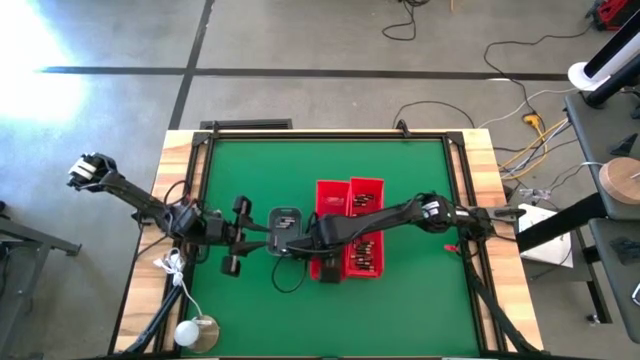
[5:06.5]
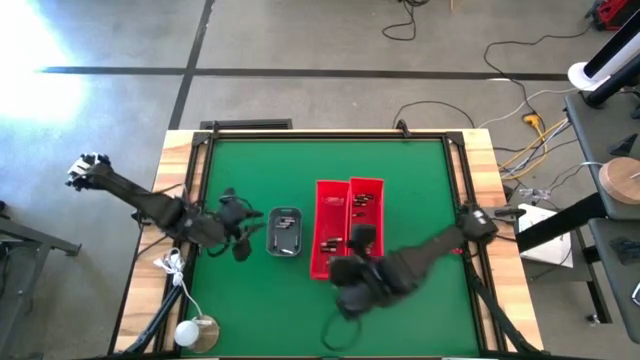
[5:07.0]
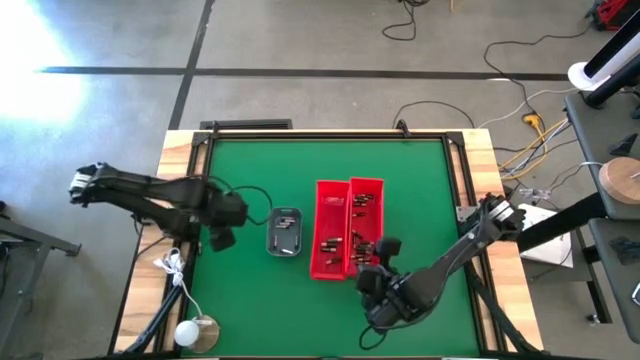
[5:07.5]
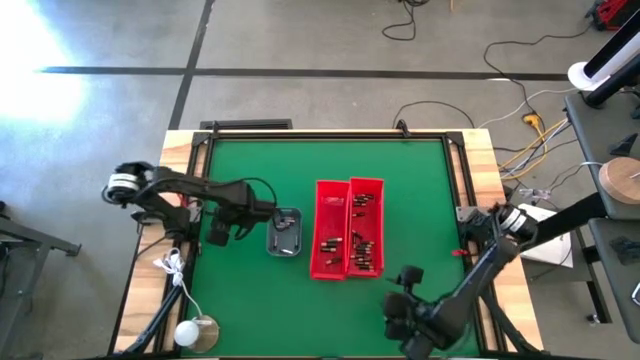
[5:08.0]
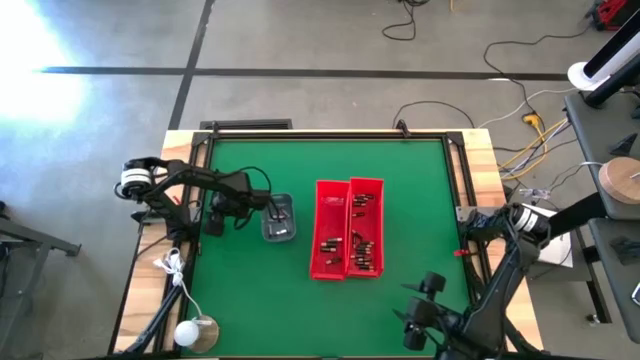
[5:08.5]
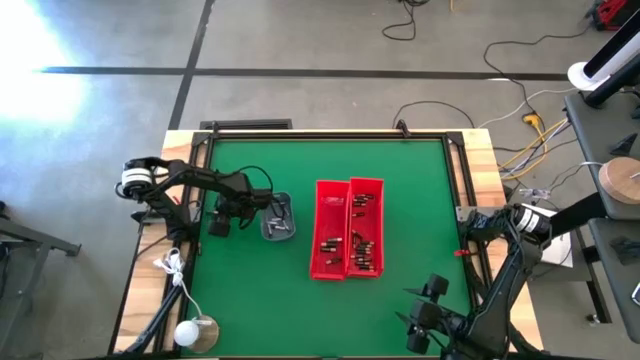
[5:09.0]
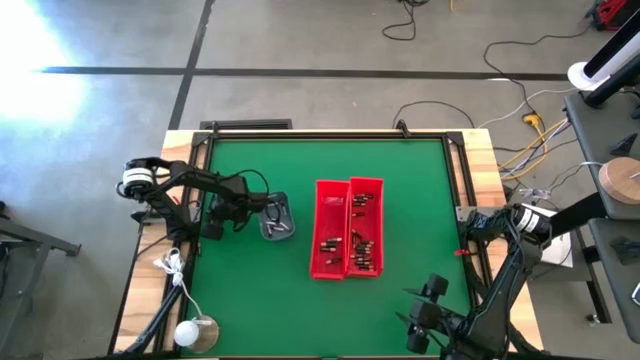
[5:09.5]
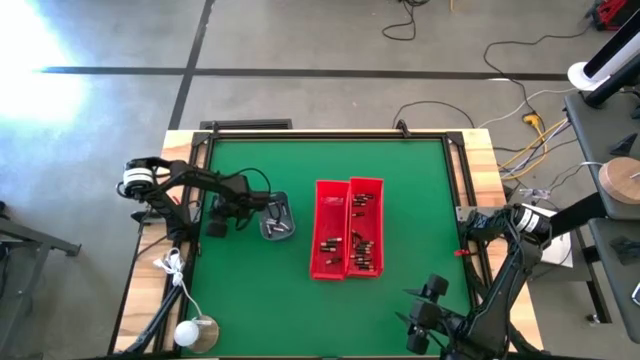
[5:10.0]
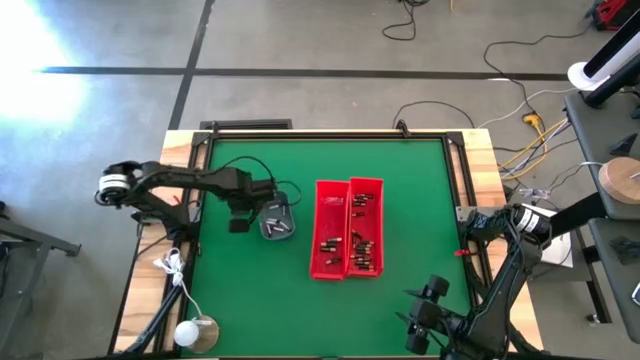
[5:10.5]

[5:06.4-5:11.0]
Task: Sort batteries
Put the small black battery into the right red bin

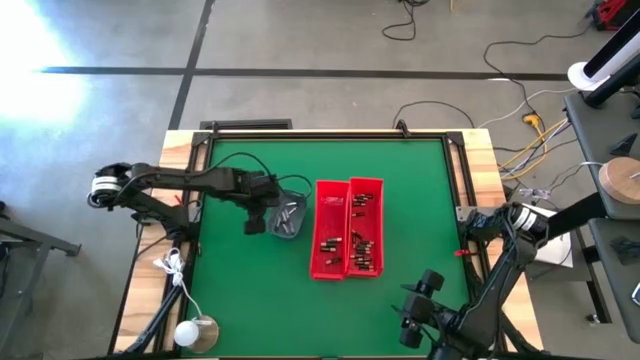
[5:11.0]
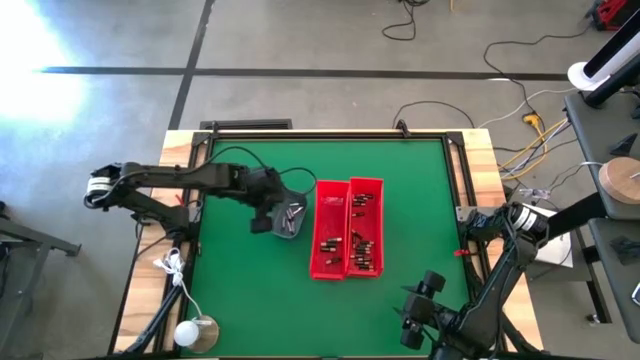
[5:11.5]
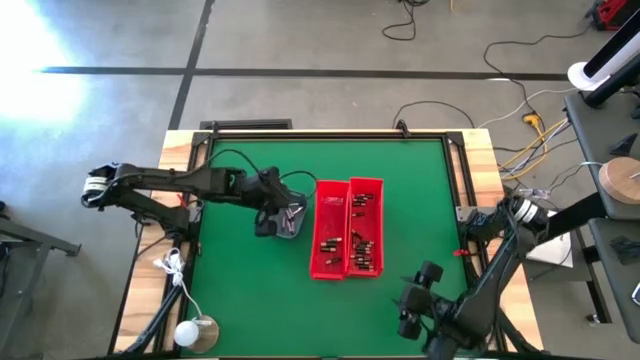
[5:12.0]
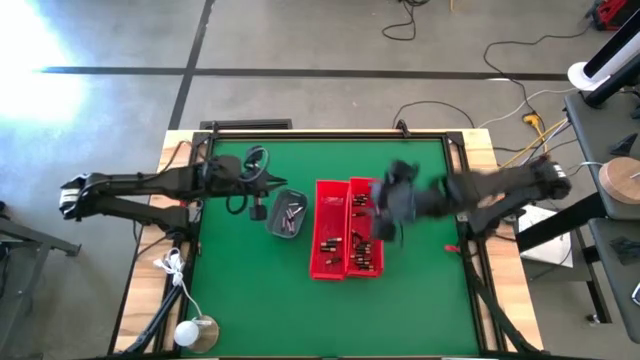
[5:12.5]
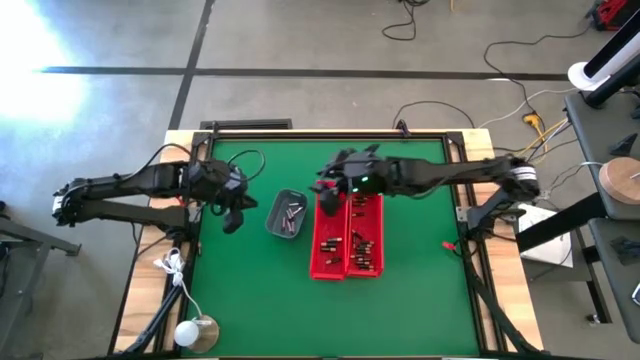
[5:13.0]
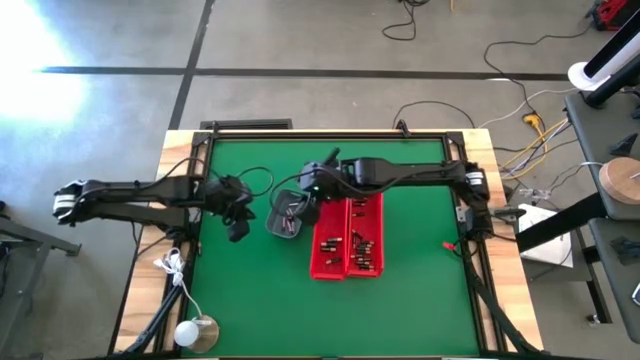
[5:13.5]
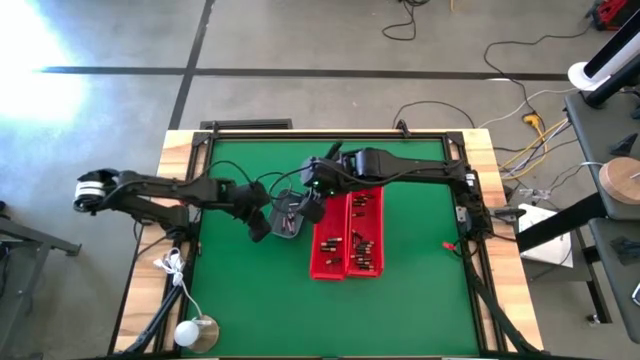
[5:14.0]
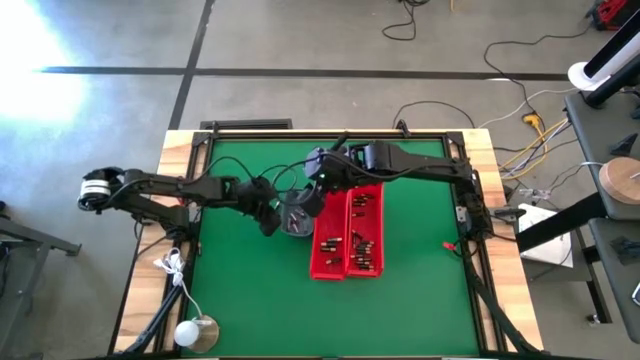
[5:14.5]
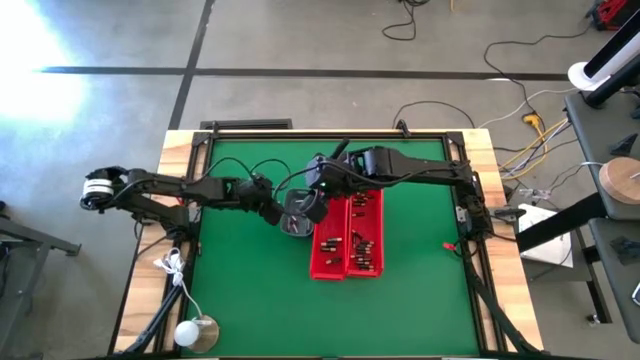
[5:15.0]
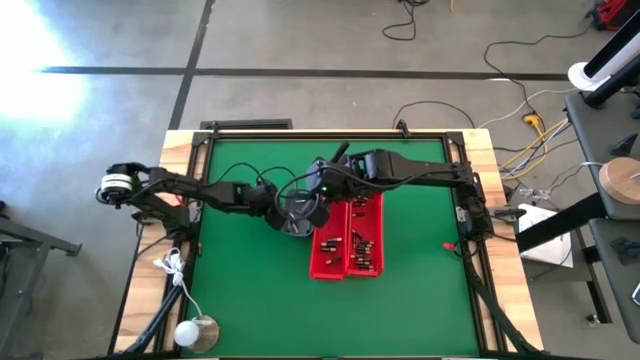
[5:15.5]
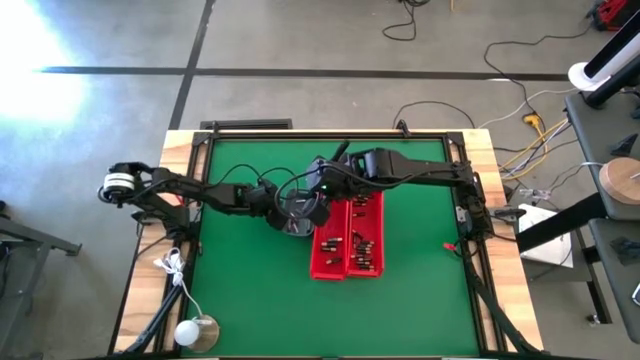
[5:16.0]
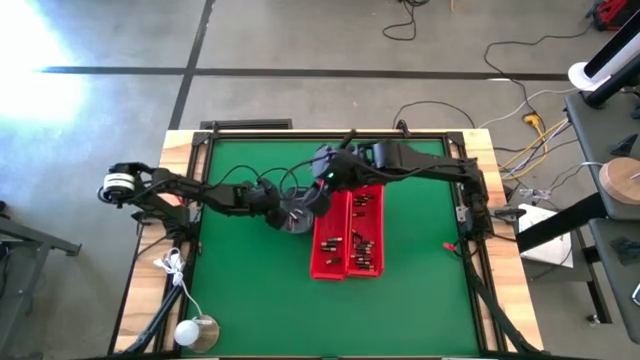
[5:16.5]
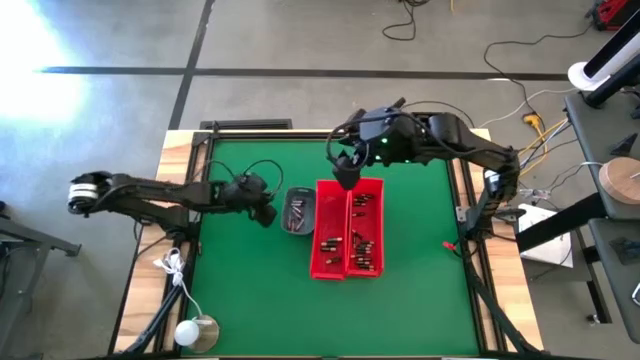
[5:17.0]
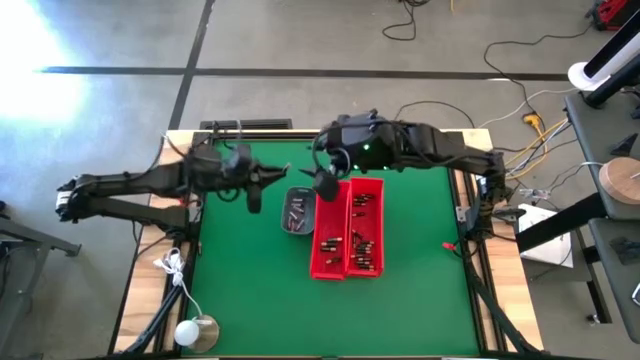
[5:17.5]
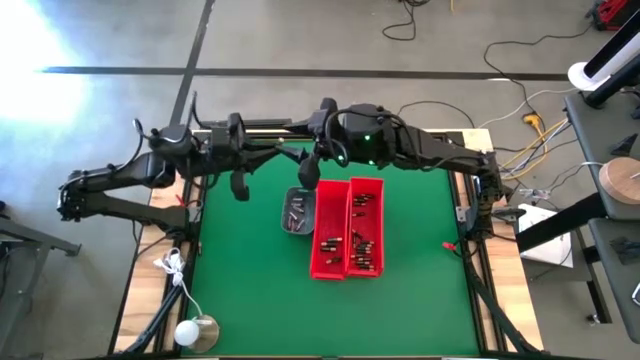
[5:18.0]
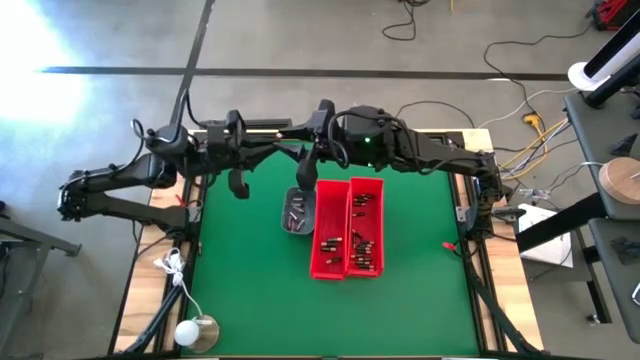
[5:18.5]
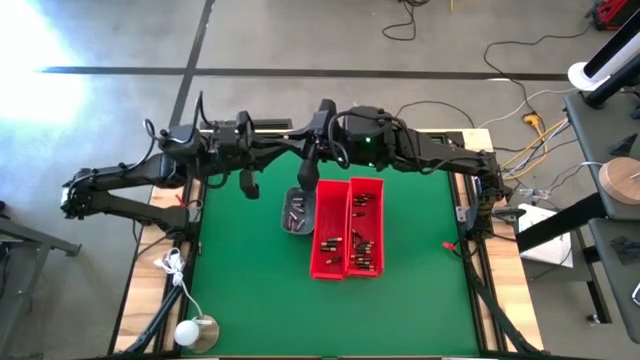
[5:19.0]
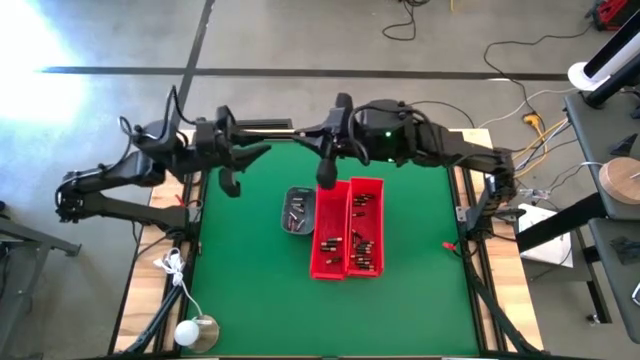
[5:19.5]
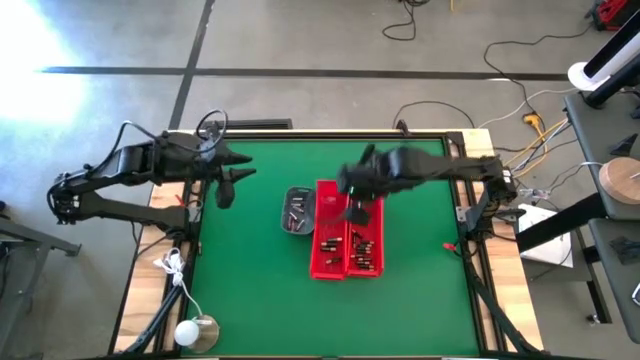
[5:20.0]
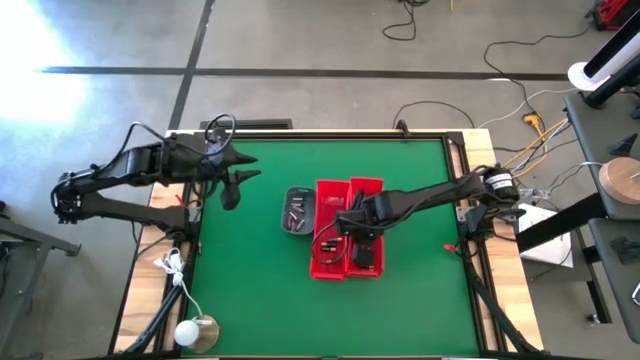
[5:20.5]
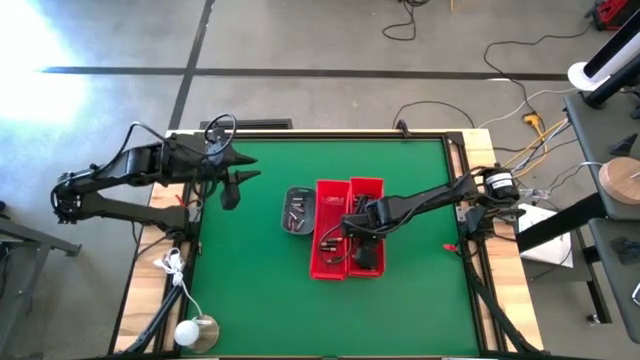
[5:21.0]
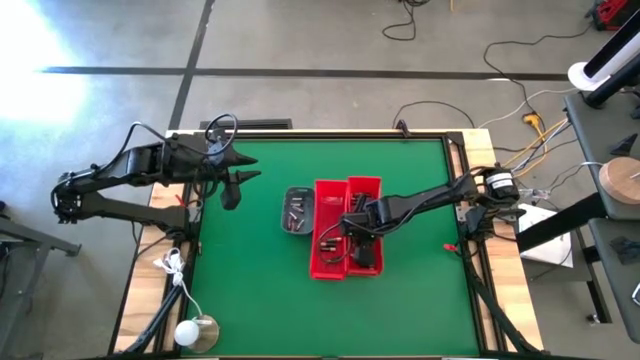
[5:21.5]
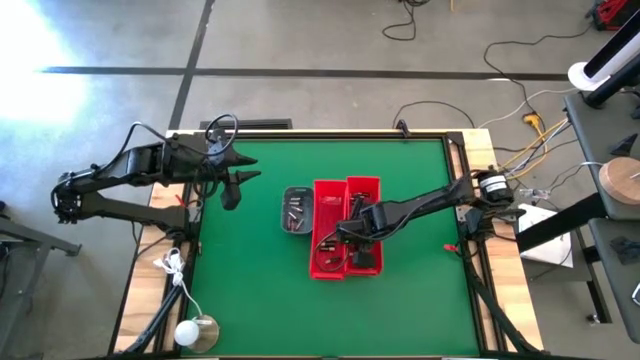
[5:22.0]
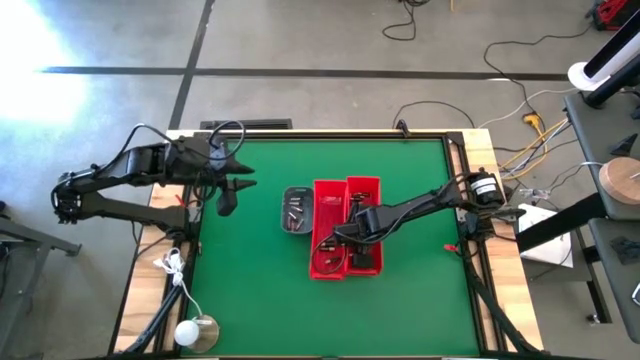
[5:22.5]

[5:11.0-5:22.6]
Put the small black battery into the right red bin

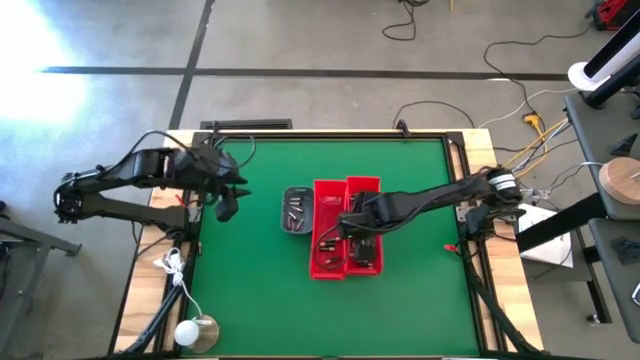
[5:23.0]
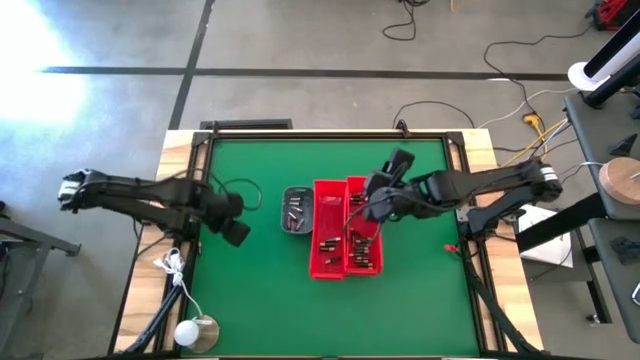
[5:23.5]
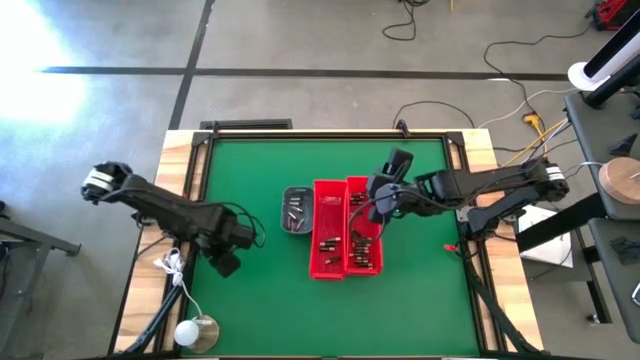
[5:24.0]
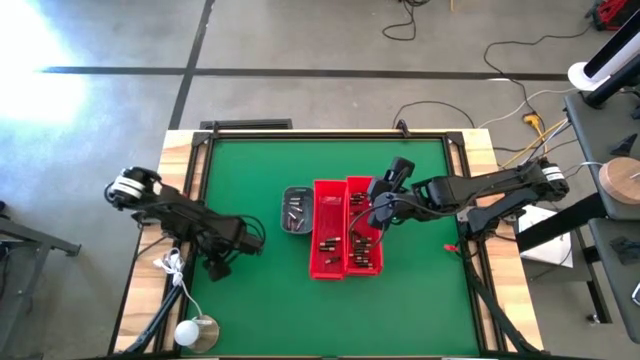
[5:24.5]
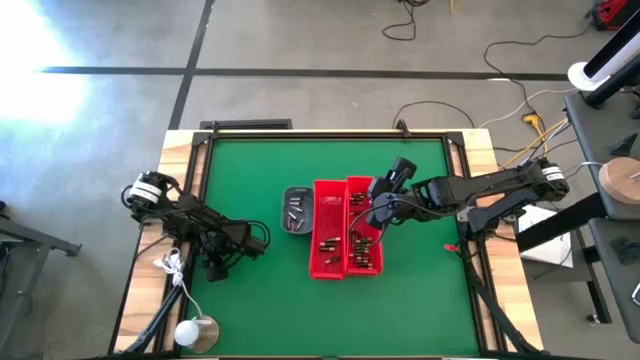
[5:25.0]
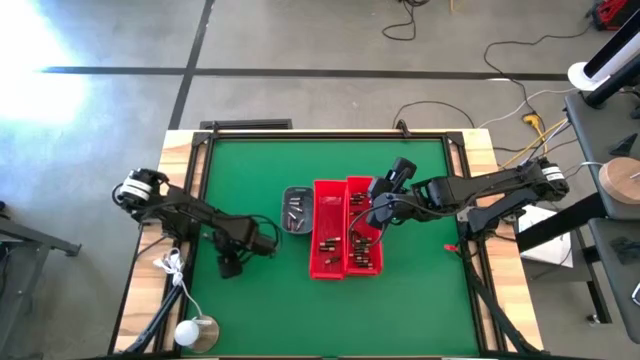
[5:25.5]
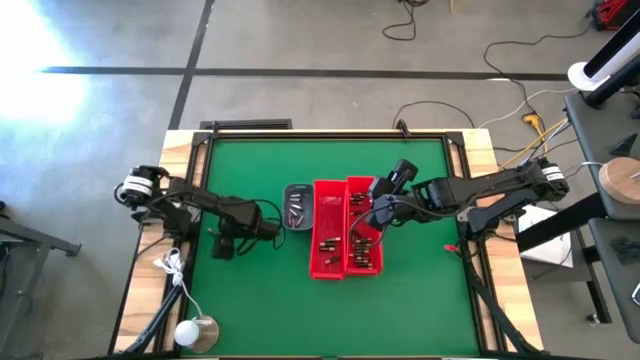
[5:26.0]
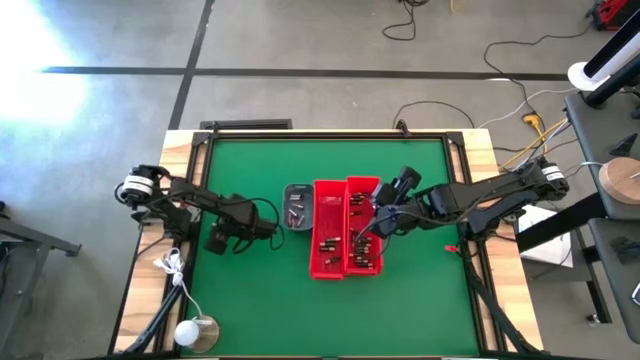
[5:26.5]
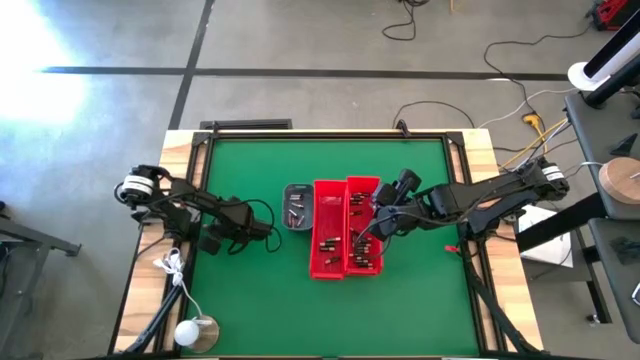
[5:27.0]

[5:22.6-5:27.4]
Put the small black battery into the right red bin
